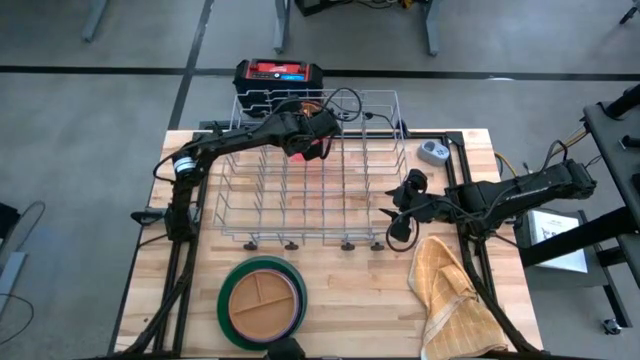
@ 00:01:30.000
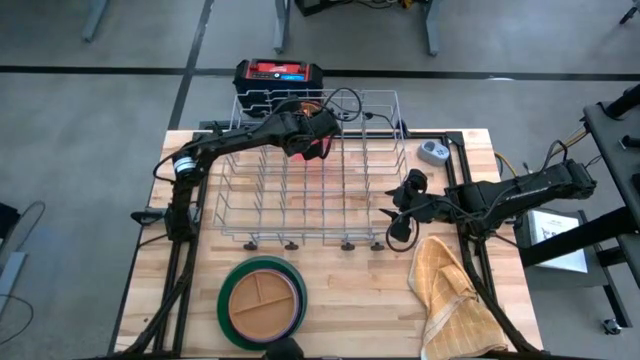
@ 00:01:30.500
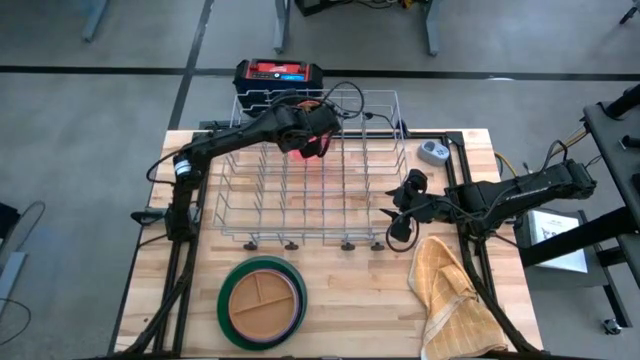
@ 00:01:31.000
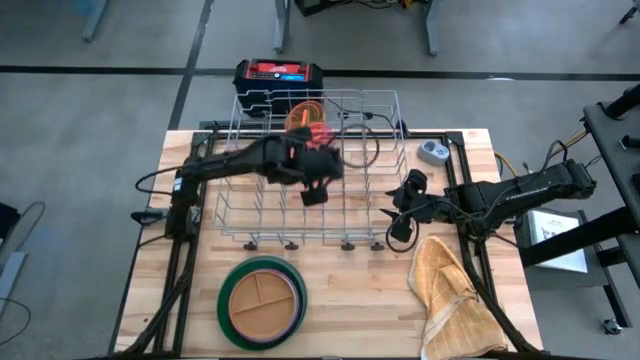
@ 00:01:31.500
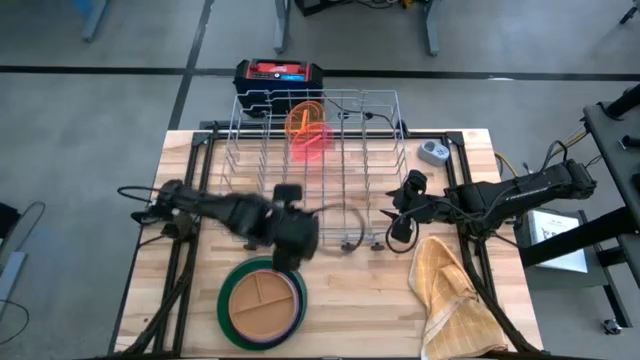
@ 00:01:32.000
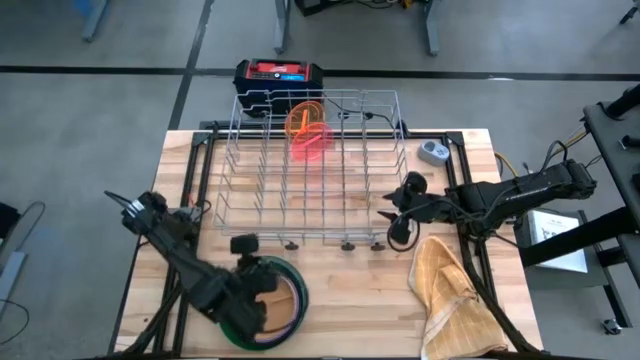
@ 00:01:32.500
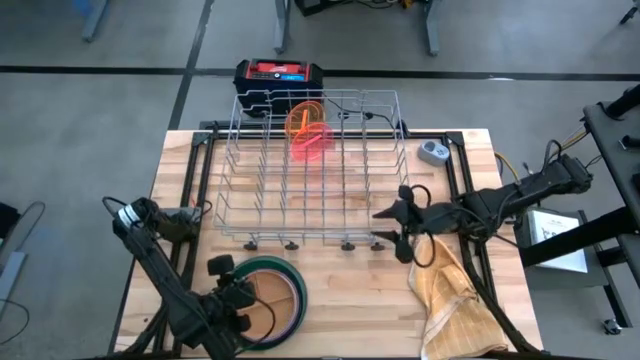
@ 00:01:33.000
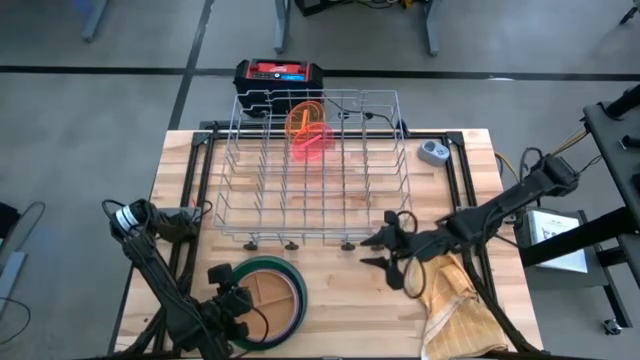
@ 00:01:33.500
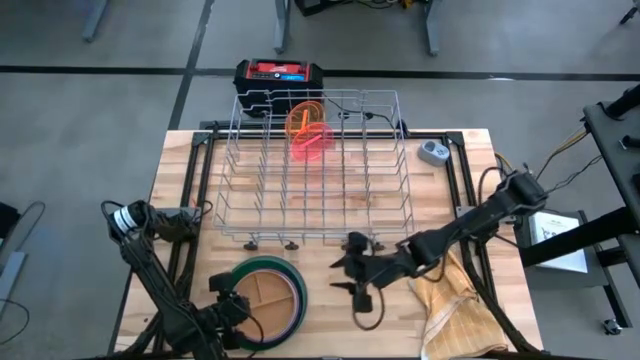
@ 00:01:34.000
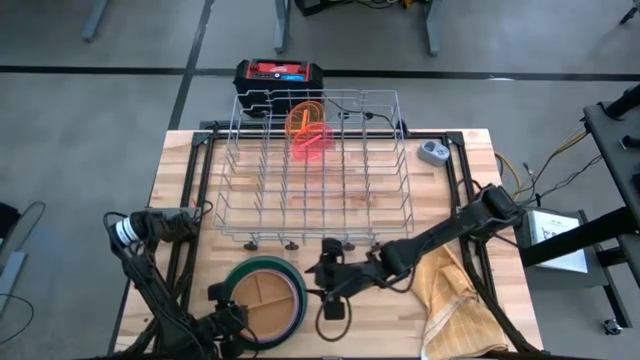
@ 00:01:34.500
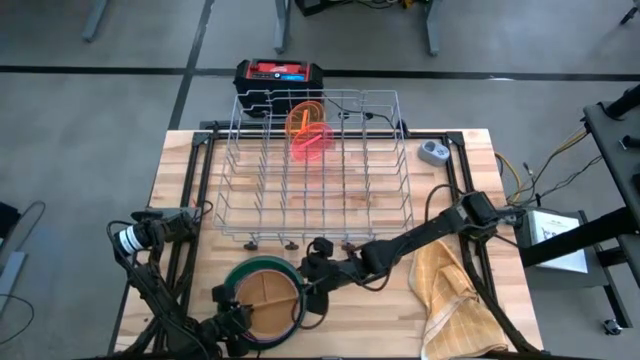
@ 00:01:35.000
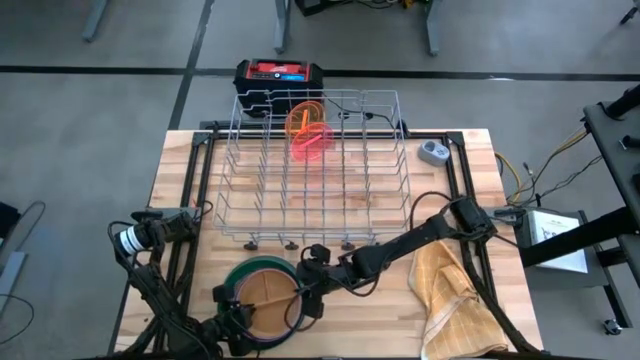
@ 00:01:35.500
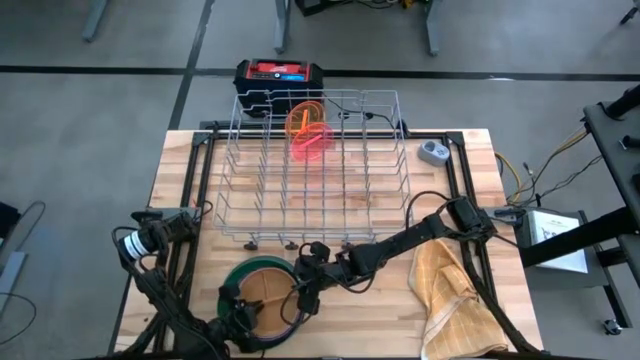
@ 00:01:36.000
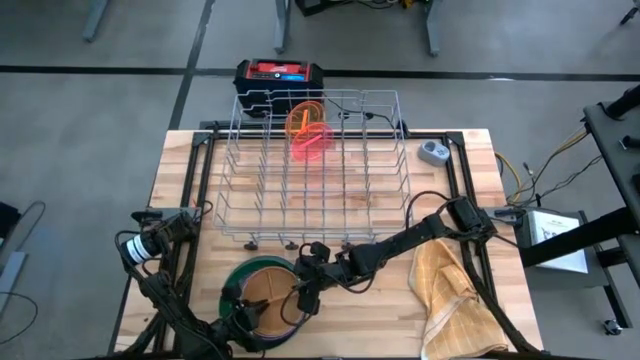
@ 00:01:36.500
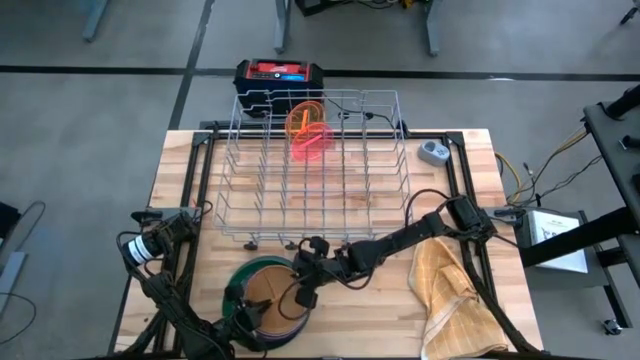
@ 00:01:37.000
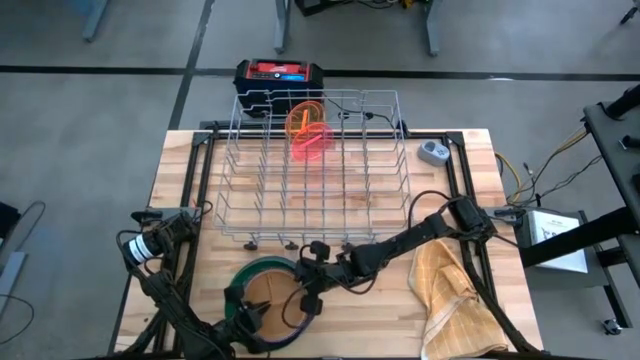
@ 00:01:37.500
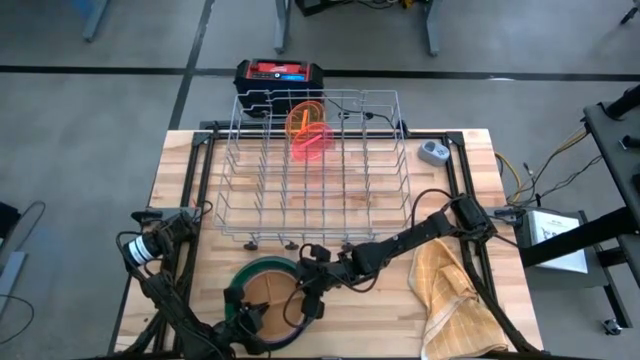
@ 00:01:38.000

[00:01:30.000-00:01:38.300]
Task: Sort dishes
Put the brown plate into the dish rack

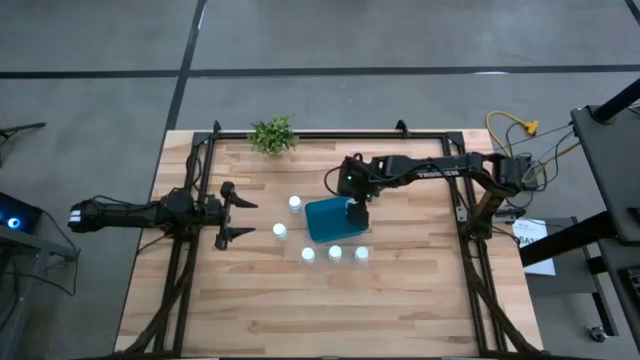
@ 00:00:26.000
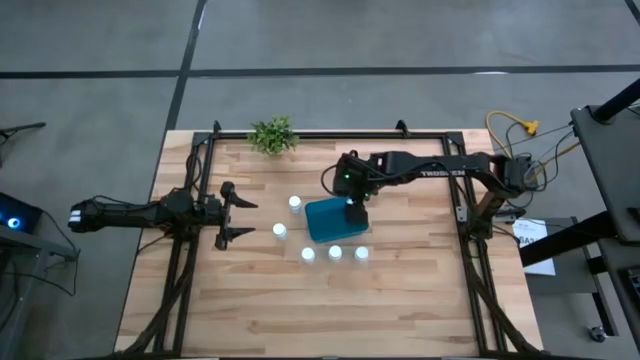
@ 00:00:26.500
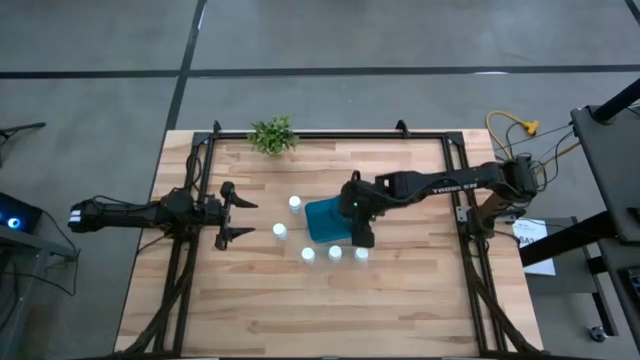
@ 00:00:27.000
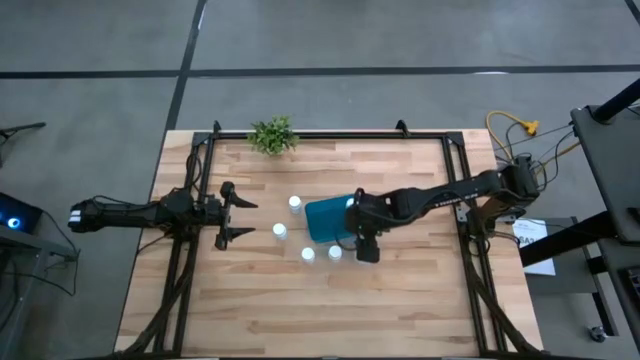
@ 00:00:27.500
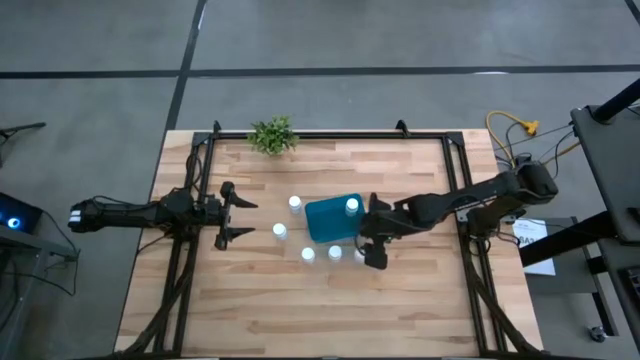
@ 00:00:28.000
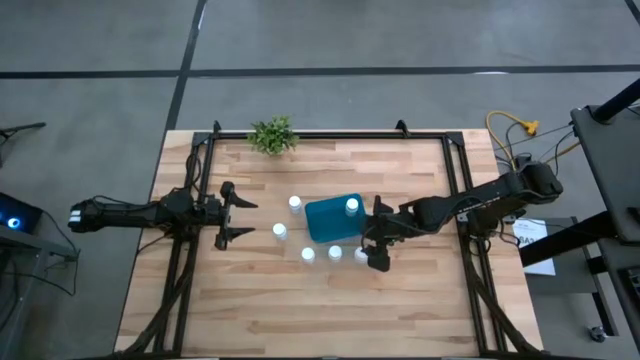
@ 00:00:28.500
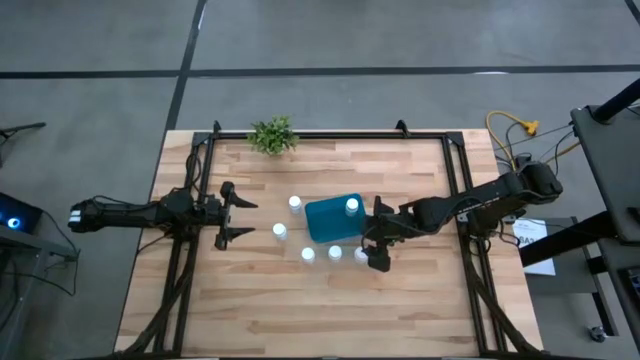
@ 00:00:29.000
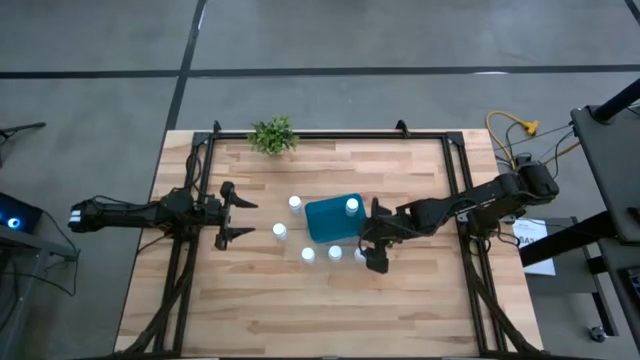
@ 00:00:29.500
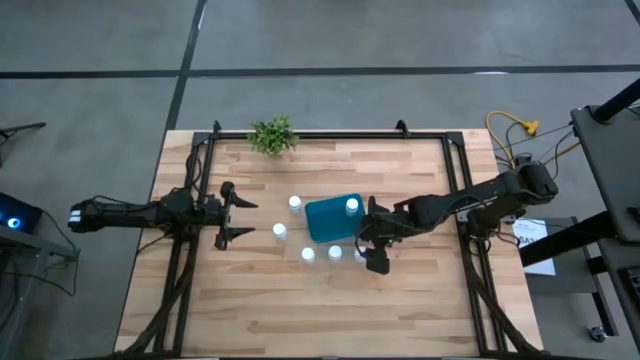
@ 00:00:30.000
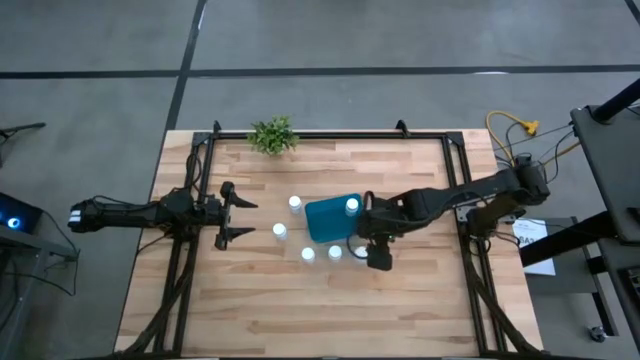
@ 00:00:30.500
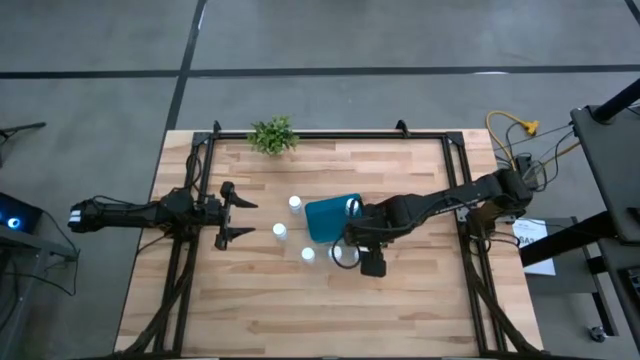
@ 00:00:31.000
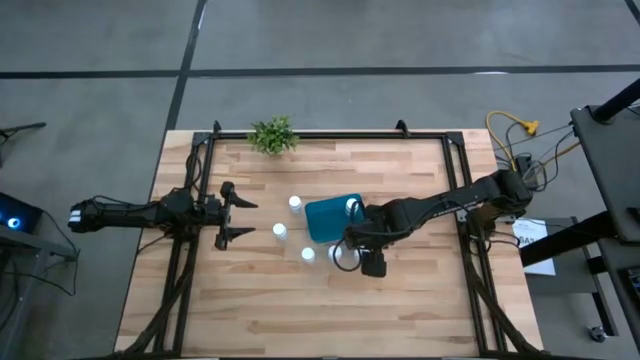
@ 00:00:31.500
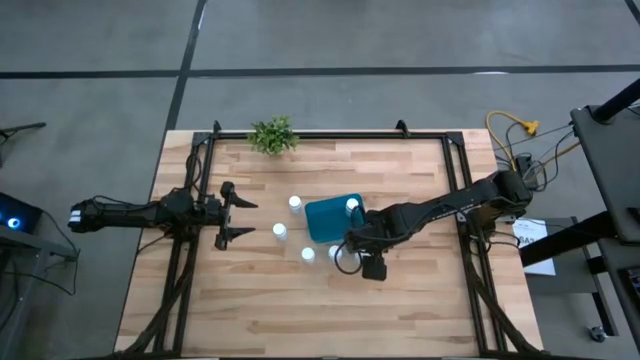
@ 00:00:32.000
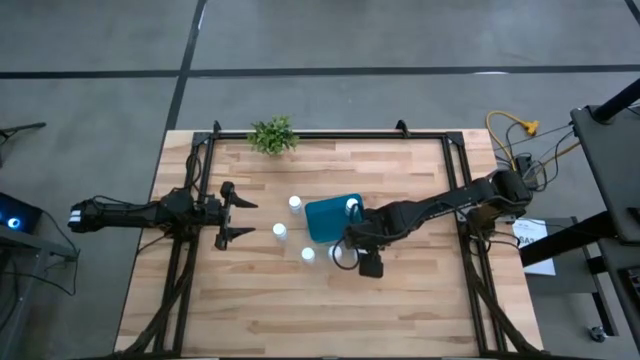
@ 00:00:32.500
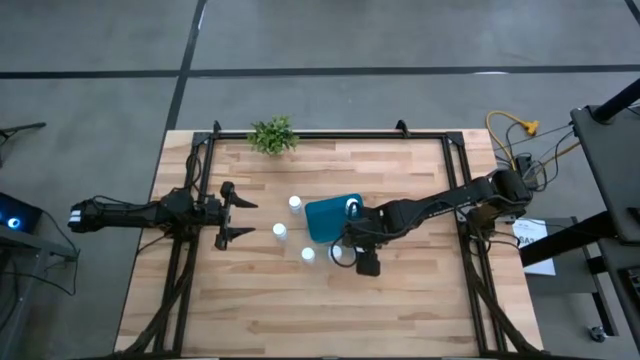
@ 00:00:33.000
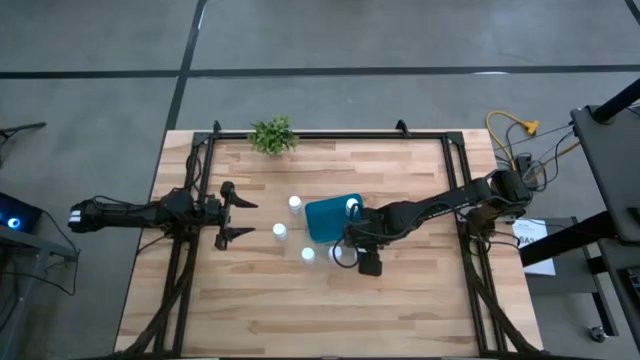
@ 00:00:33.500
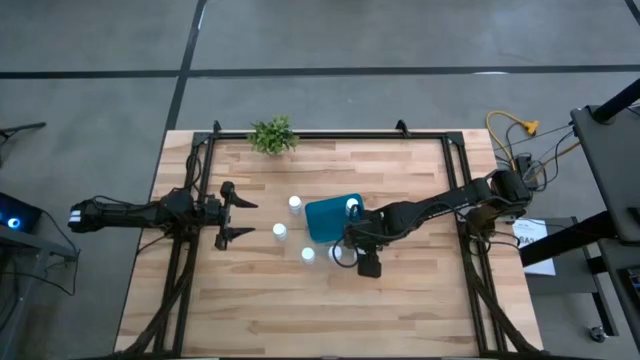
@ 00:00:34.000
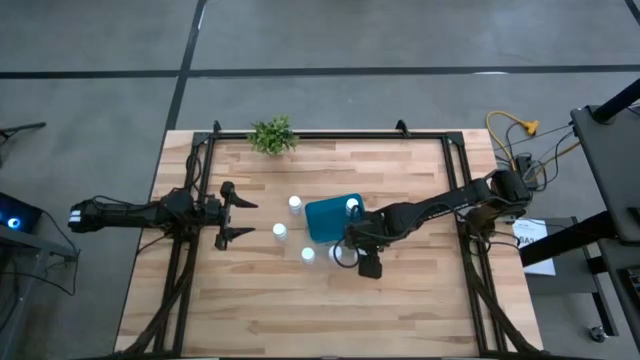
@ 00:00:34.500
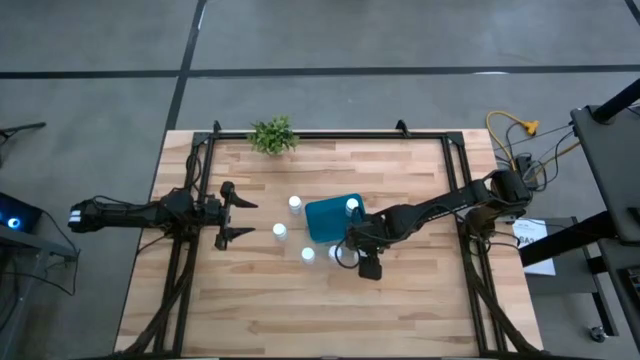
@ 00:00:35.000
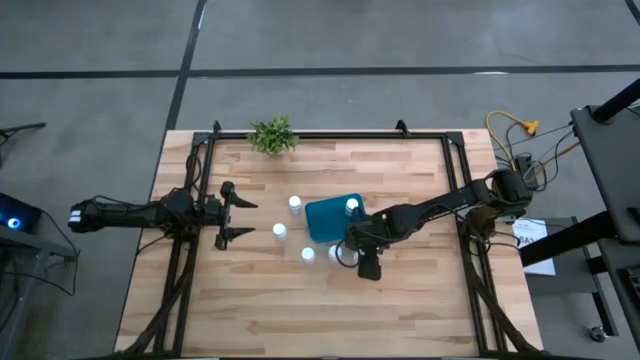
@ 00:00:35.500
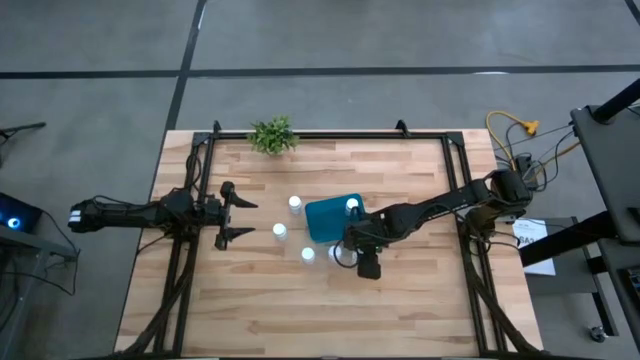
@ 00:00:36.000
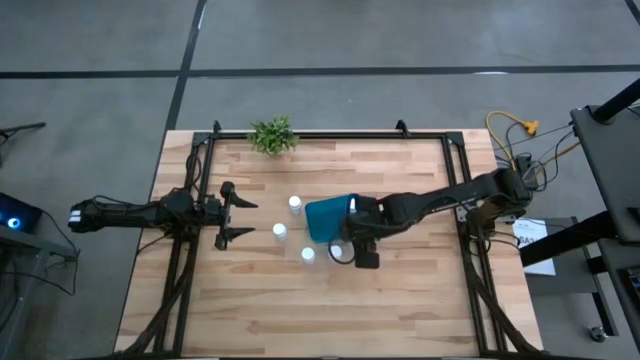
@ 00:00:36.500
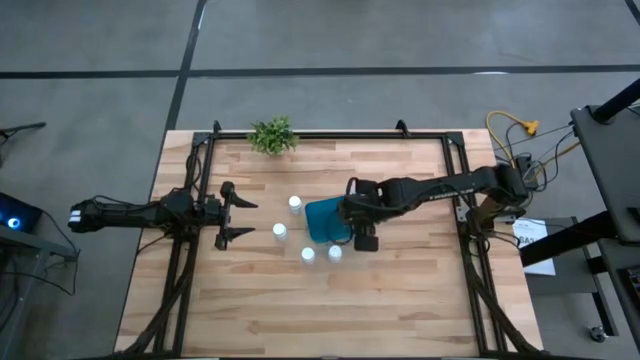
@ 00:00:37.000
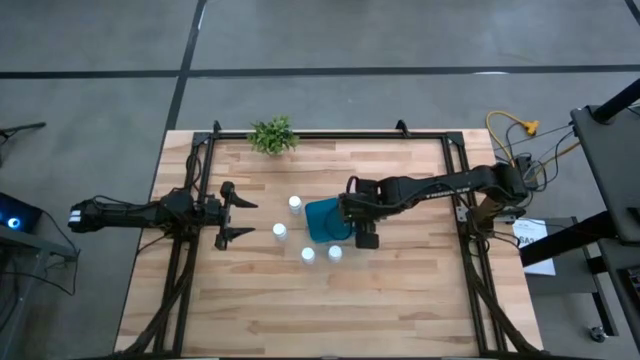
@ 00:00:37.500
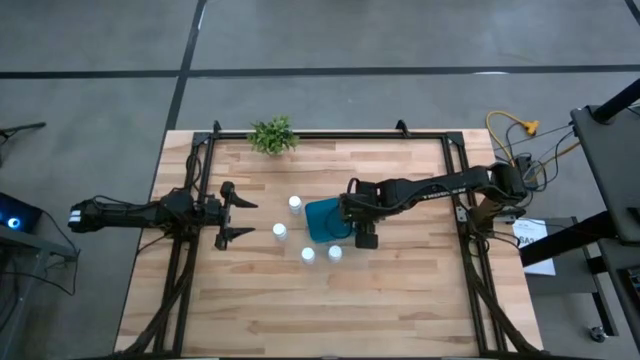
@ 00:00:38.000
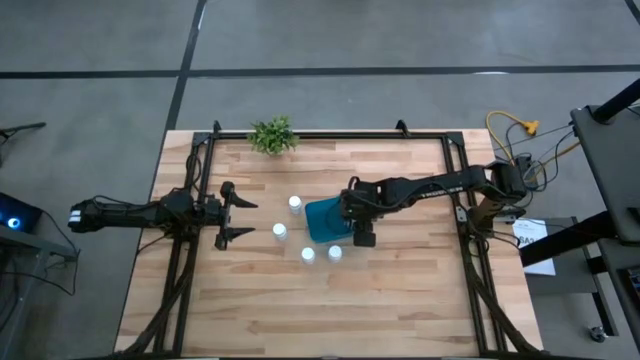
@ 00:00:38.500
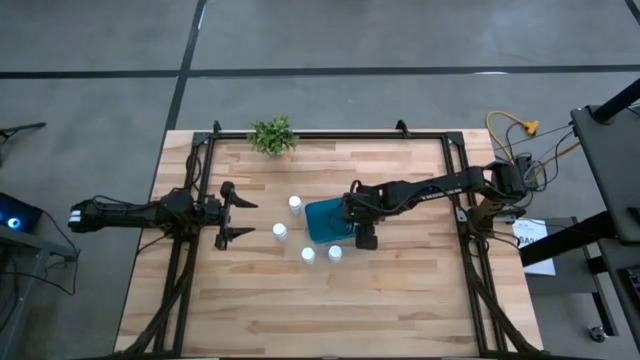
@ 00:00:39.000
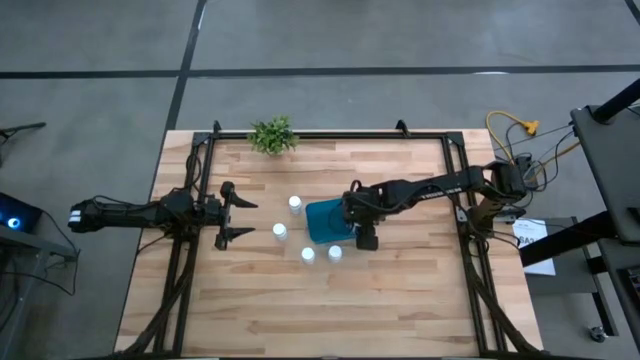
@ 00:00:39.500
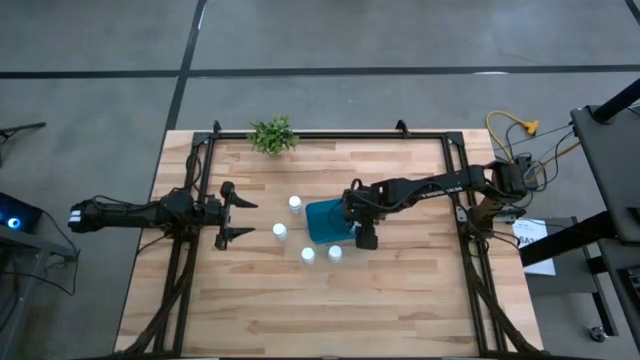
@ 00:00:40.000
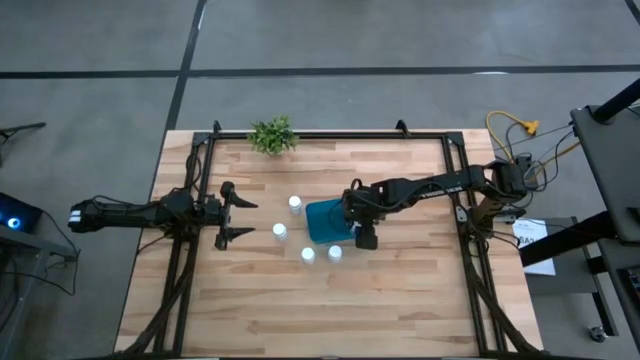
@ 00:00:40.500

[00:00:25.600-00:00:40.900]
Task: Pick and place pill bottles into a basket
Put the white medicine bottle into the blue bin
